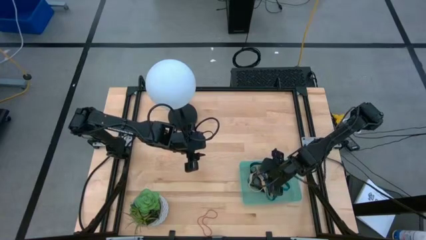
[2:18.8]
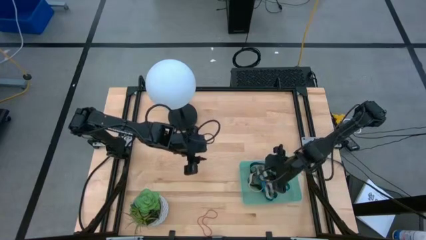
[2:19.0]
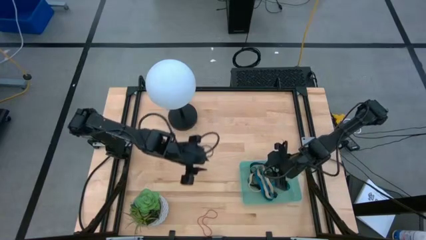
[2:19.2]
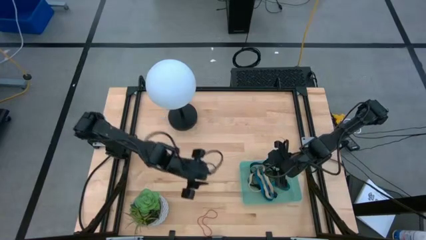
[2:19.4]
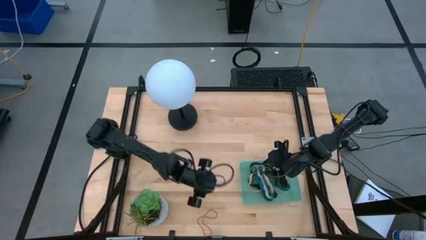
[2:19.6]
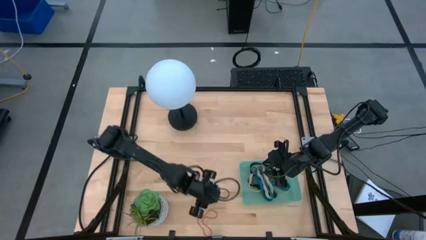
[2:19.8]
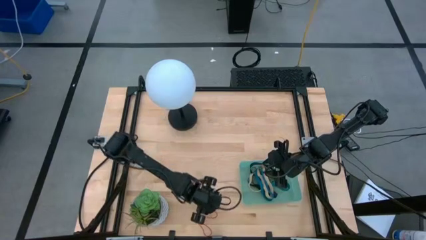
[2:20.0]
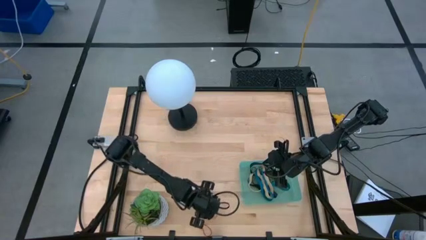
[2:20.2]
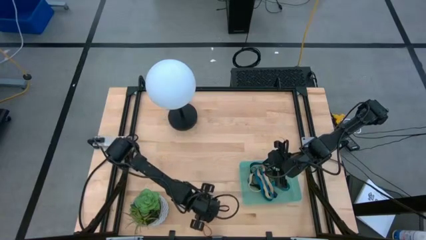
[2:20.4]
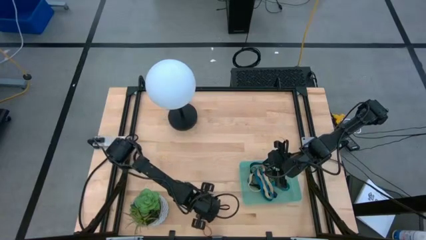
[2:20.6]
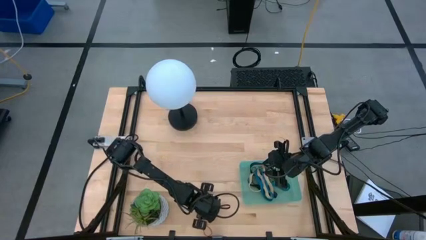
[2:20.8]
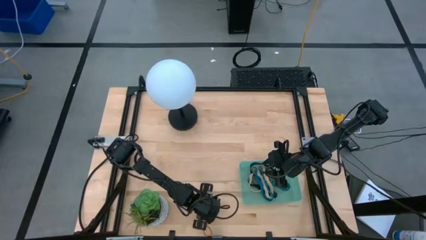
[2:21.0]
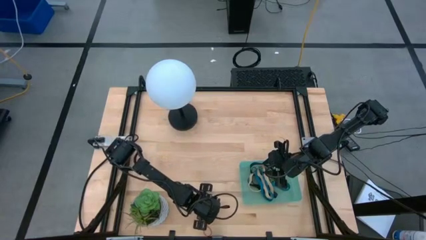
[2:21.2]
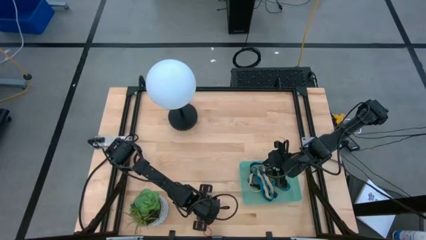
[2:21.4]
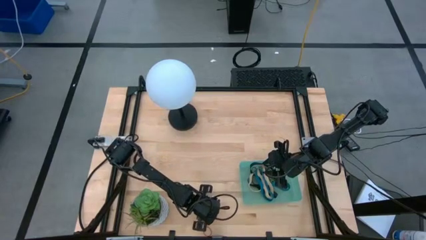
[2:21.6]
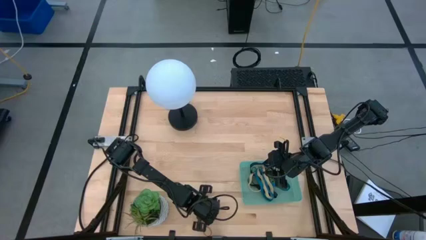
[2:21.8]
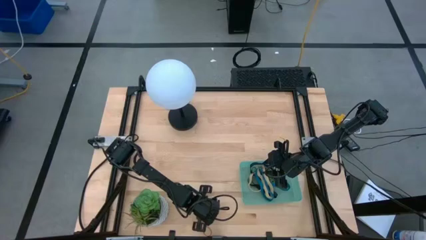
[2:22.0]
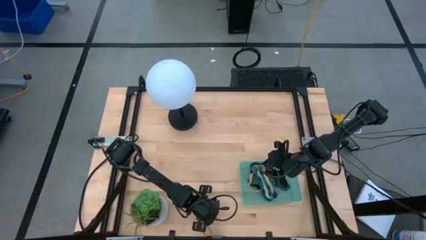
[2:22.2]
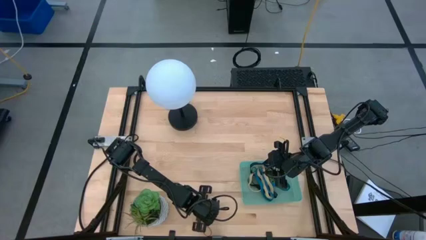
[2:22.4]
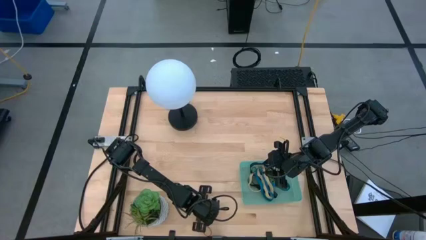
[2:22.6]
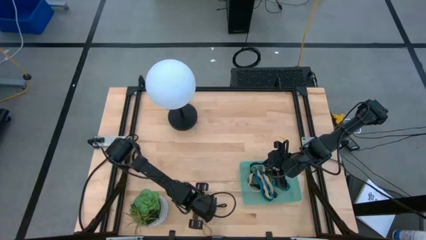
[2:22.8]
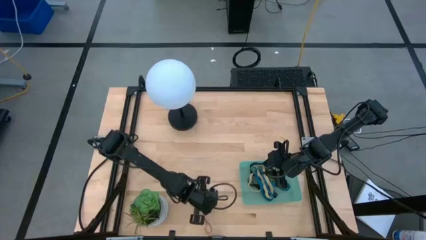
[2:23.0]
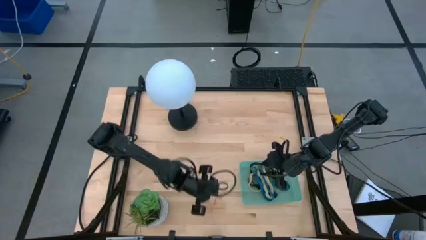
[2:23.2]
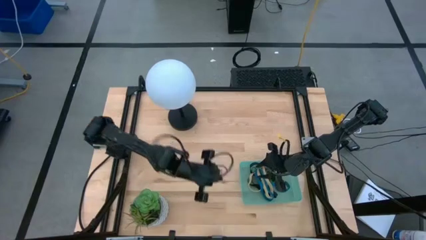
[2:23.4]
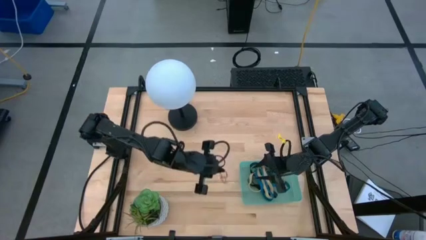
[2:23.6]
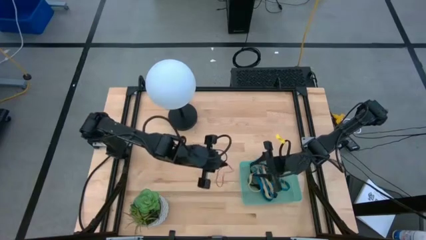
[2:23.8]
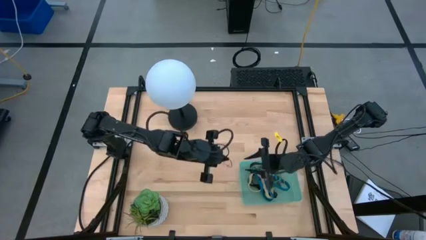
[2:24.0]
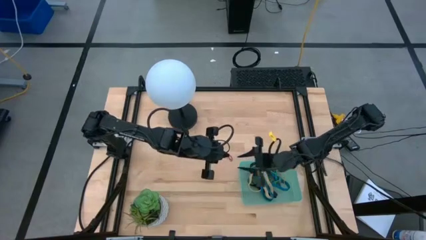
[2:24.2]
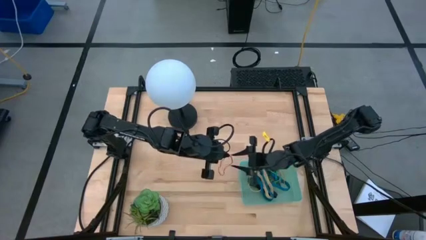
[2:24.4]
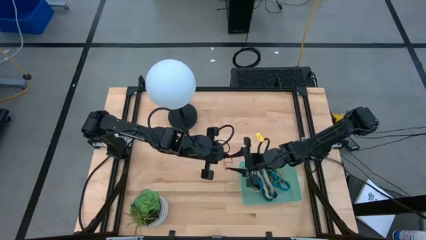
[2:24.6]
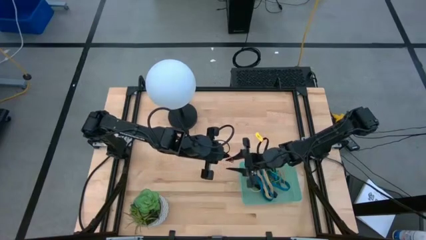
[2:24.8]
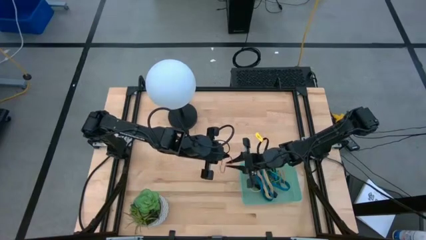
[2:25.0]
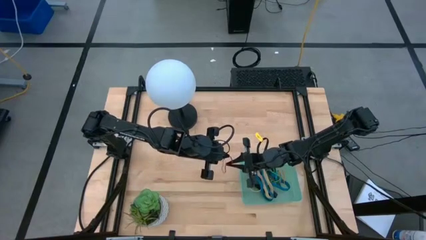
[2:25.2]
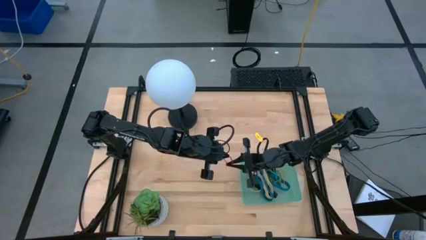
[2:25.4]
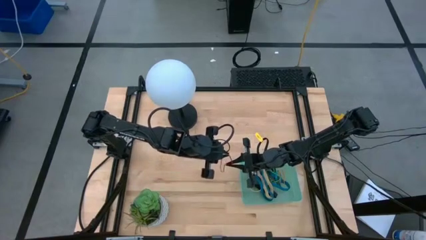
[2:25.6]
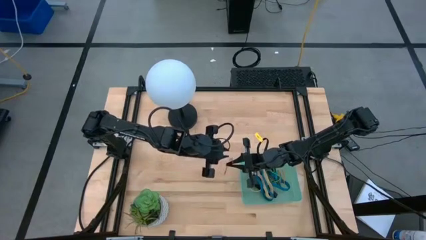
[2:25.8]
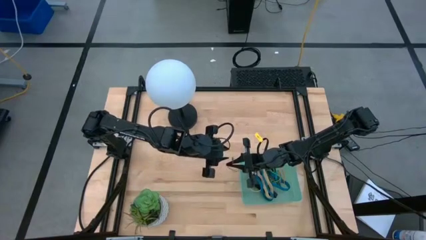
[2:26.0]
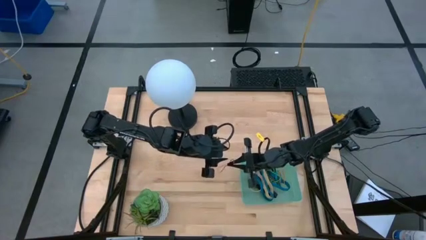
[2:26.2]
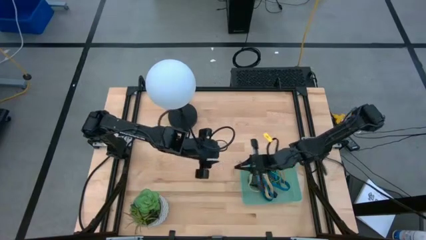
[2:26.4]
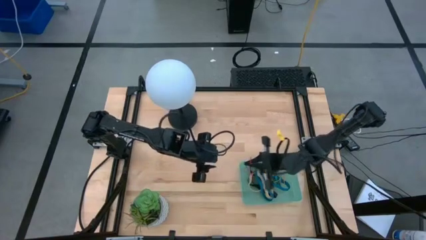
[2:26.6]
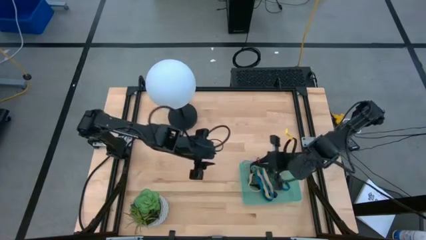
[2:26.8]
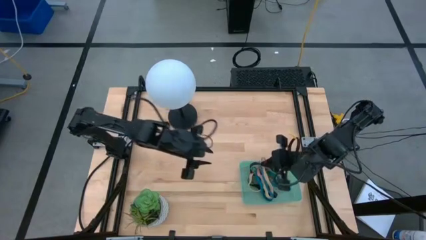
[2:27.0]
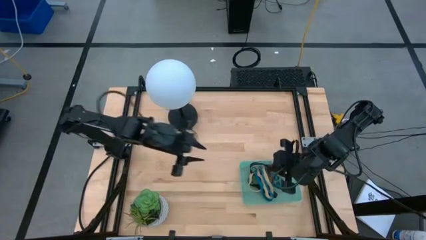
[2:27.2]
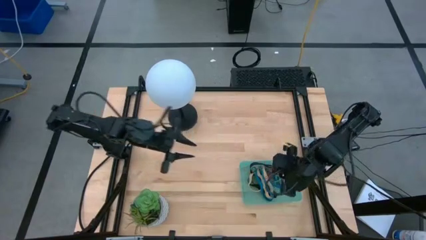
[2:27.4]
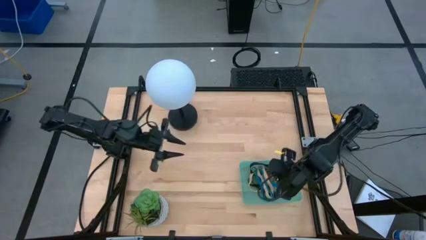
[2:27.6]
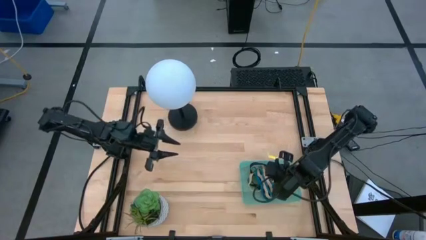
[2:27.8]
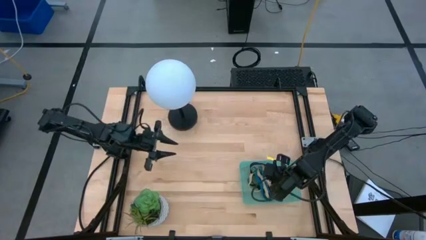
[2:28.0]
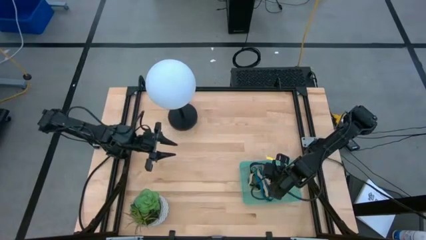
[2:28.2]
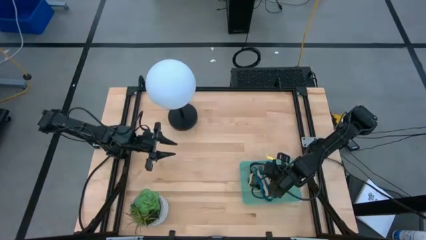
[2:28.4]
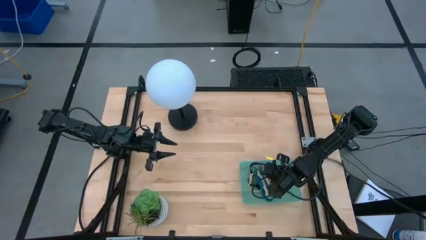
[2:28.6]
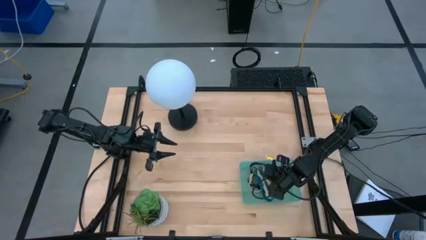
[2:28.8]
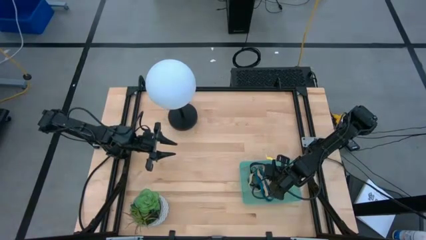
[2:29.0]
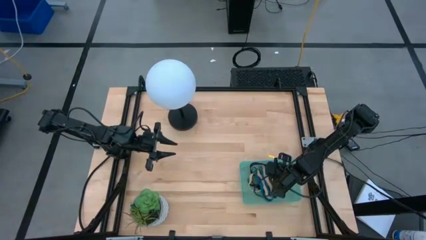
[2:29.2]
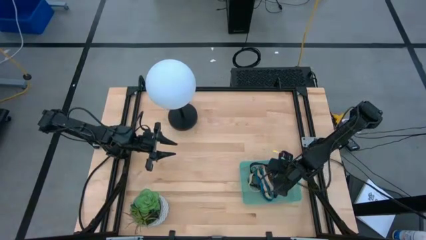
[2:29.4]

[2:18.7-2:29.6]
Task: Pick and place rubber bands into bin
Put the red rubber band into the green bin

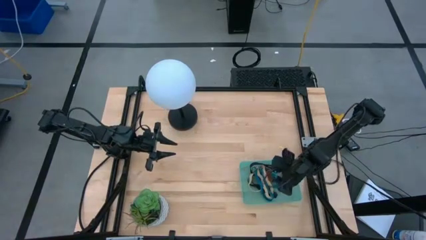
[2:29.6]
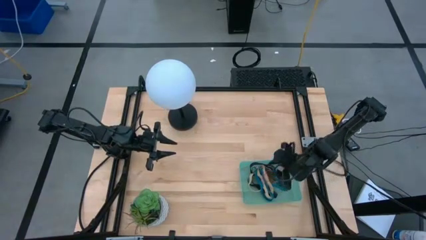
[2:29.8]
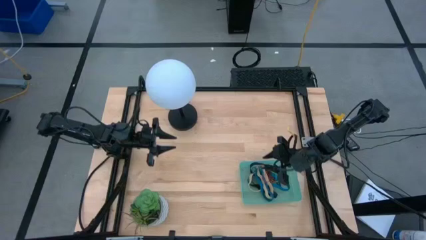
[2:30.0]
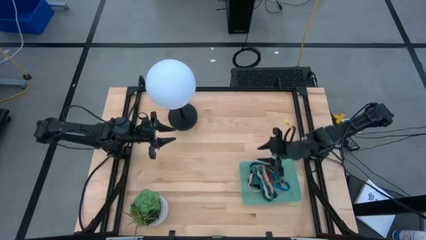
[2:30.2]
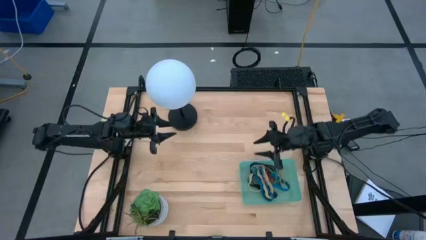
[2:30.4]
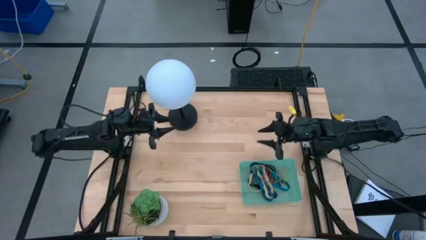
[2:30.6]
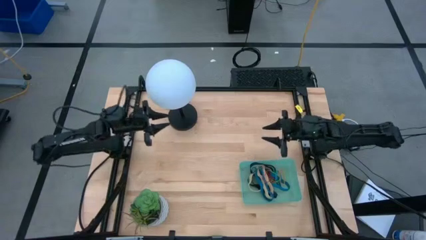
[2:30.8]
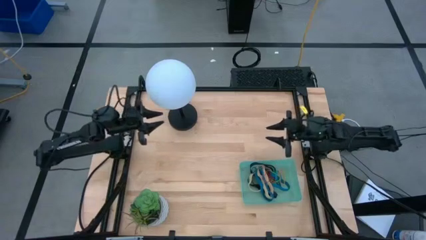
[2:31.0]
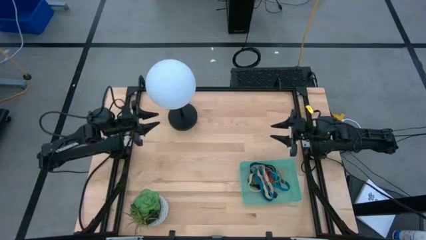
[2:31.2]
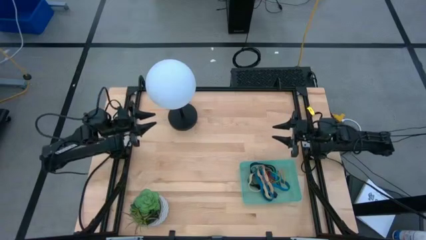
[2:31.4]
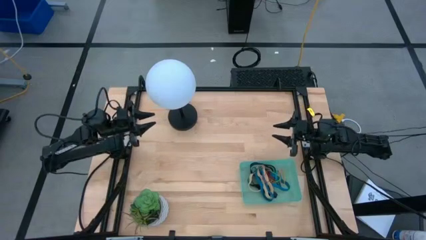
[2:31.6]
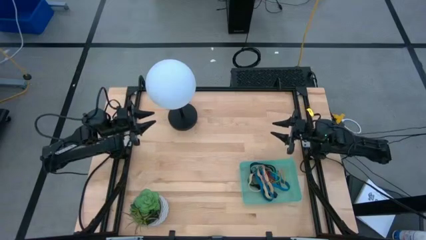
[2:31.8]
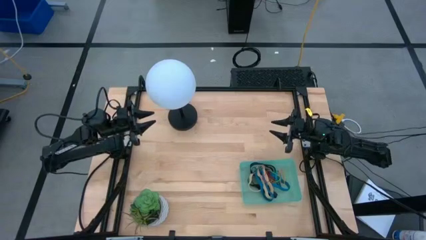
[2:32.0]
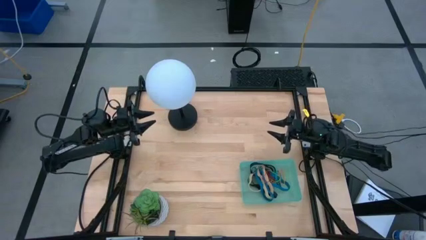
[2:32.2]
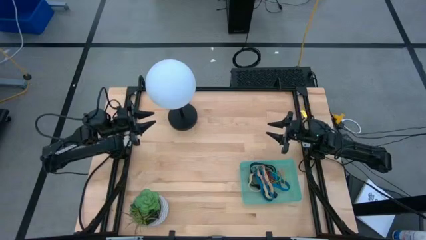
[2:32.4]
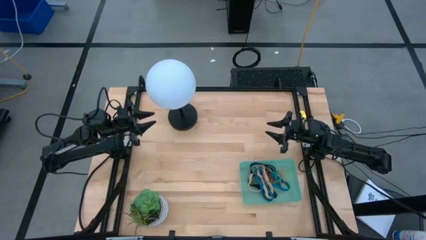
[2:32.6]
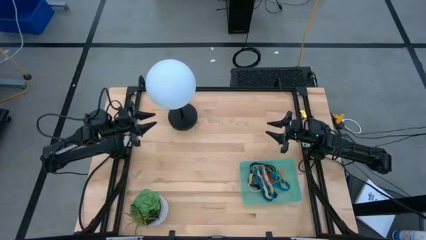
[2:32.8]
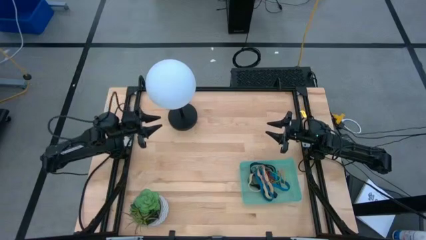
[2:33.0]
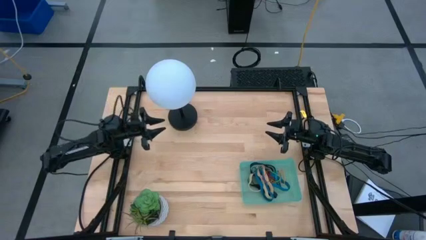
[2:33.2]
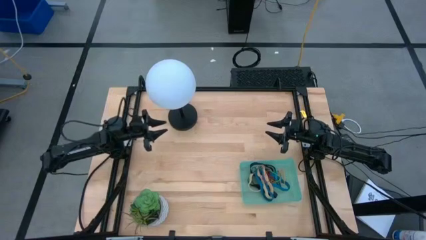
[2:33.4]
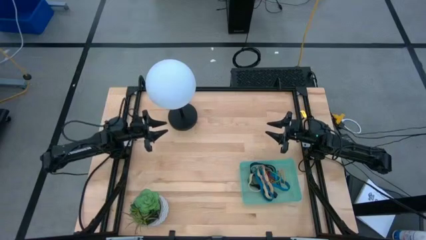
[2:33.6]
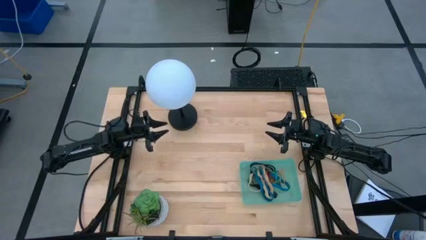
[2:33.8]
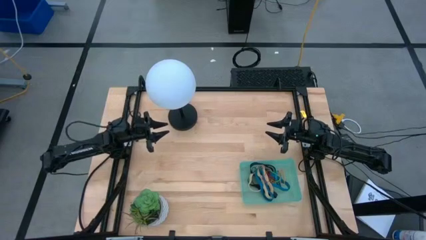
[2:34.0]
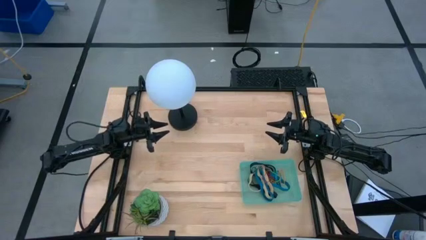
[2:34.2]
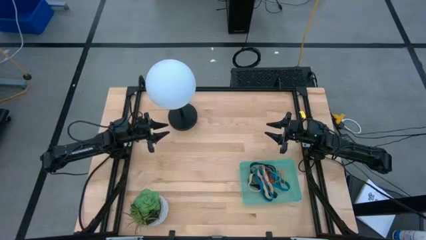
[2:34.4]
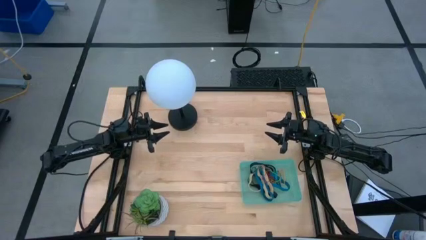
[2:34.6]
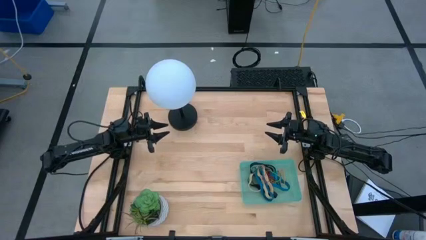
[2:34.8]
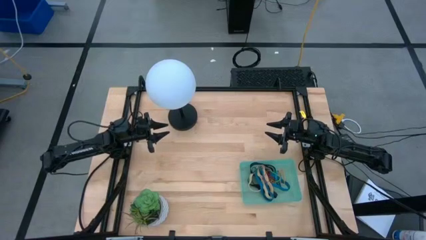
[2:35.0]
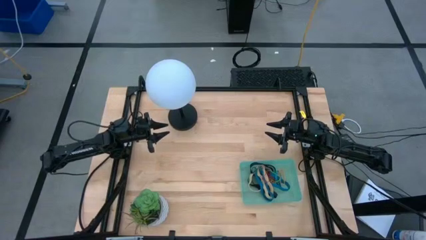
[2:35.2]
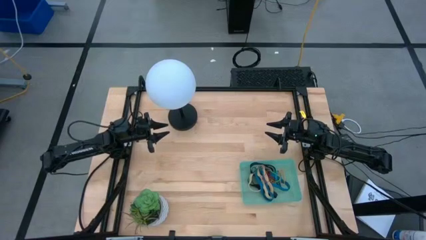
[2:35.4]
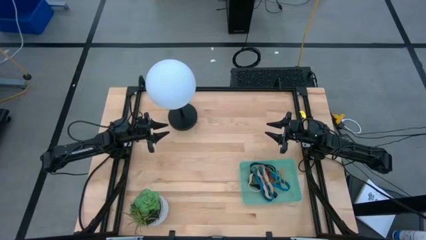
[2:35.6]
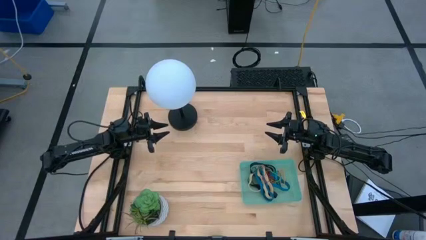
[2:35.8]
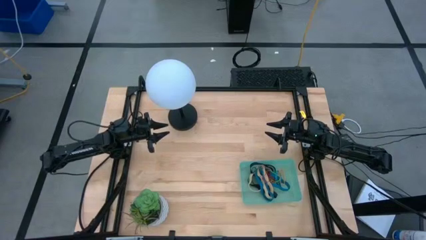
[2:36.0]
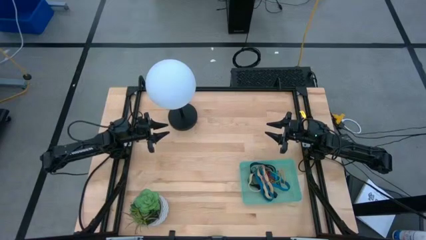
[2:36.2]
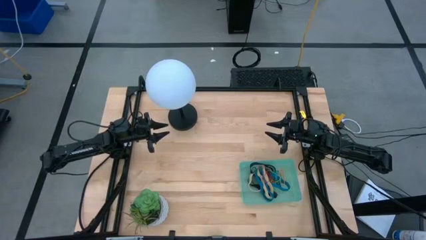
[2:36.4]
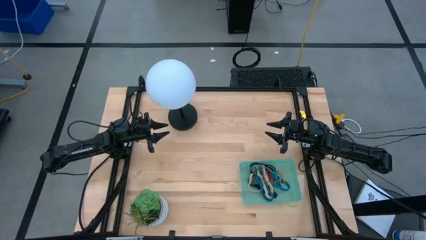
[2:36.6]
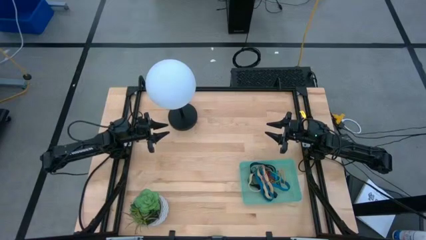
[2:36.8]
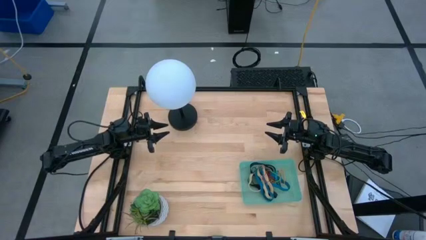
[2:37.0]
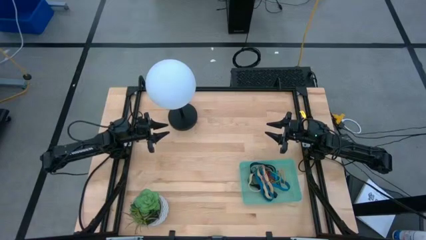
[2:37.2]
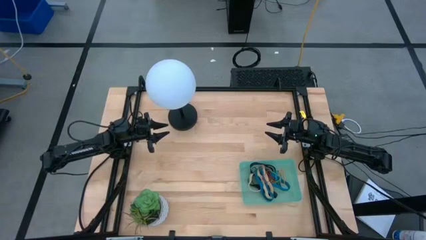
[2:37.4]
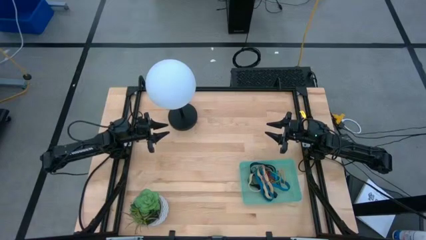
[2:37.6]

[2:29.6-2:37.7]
Return to Home Position
